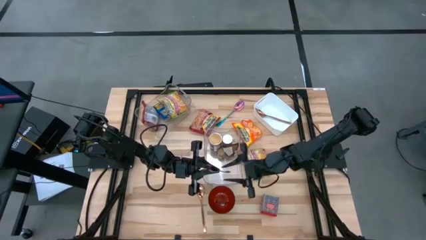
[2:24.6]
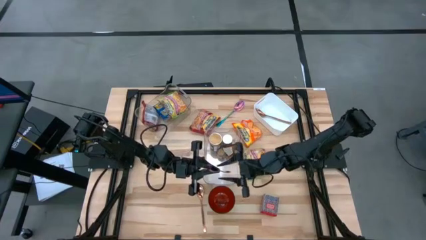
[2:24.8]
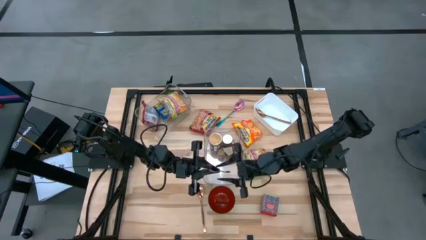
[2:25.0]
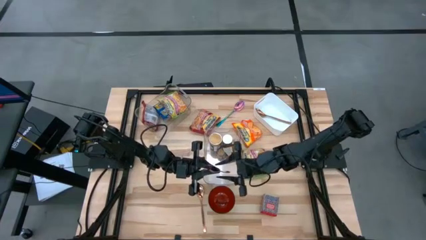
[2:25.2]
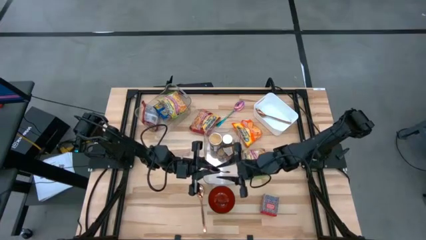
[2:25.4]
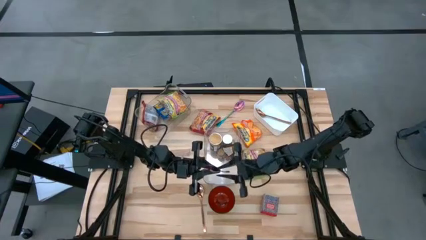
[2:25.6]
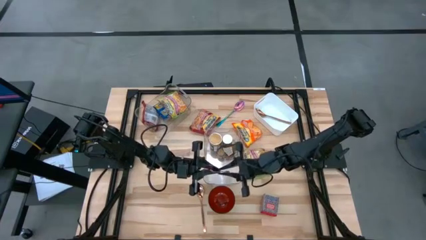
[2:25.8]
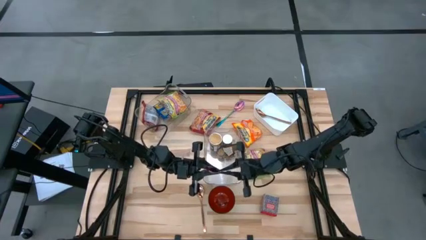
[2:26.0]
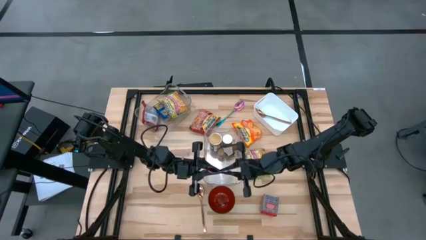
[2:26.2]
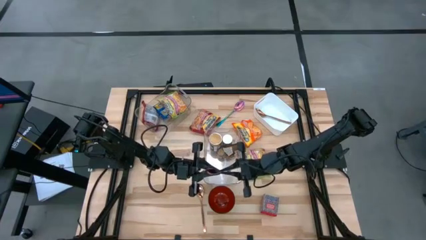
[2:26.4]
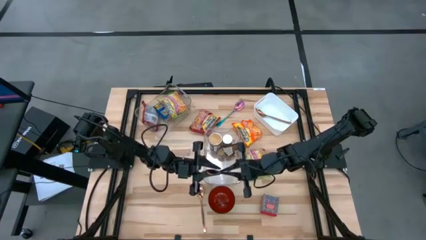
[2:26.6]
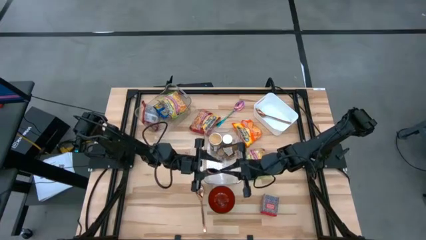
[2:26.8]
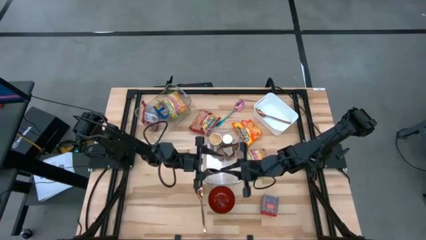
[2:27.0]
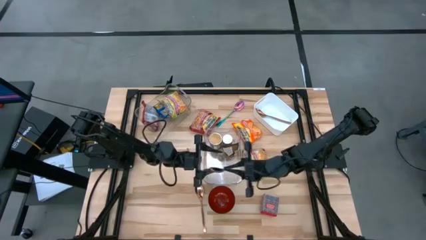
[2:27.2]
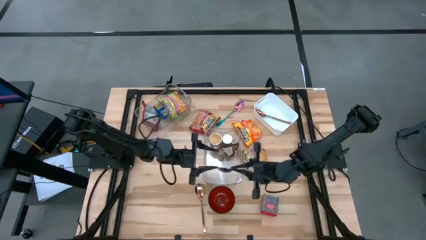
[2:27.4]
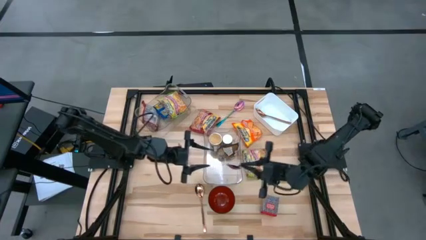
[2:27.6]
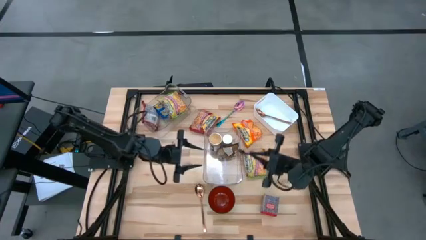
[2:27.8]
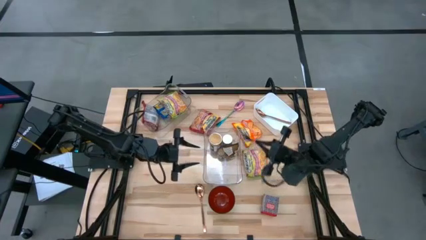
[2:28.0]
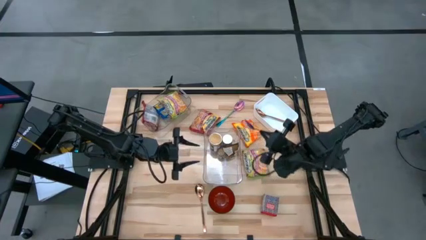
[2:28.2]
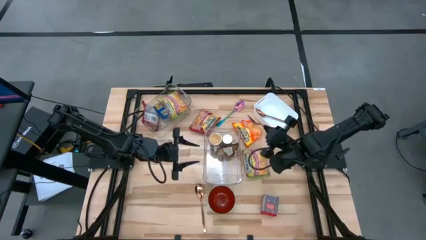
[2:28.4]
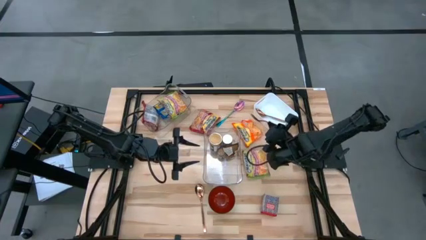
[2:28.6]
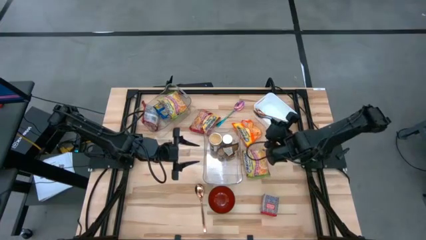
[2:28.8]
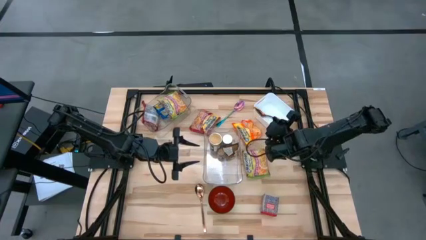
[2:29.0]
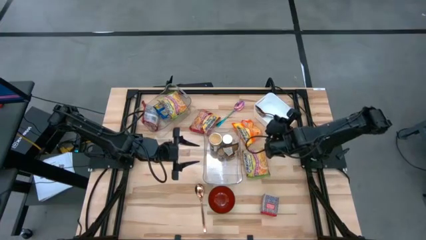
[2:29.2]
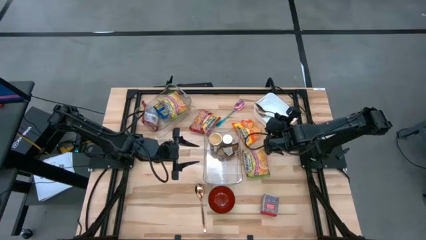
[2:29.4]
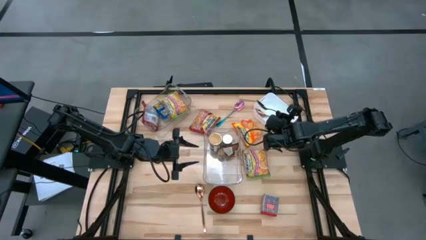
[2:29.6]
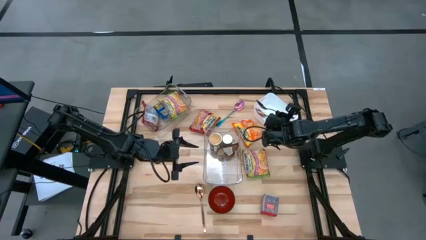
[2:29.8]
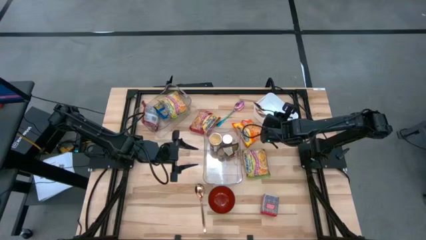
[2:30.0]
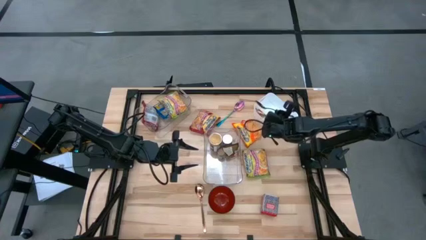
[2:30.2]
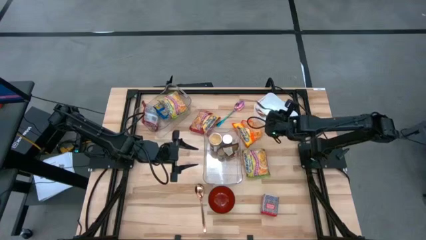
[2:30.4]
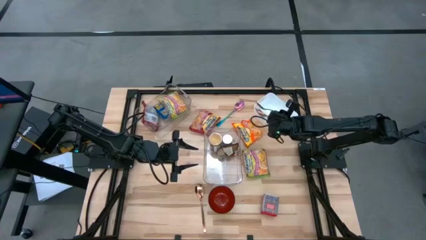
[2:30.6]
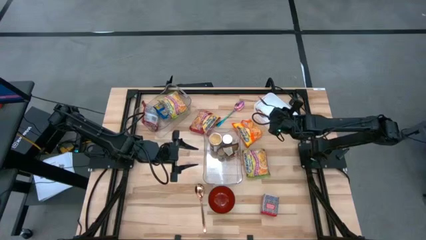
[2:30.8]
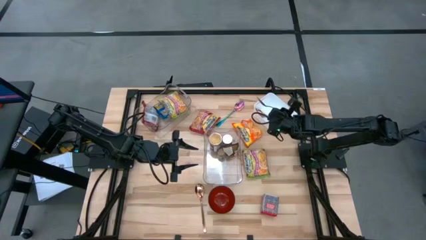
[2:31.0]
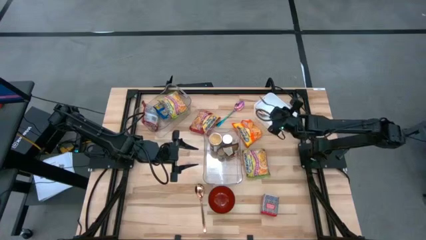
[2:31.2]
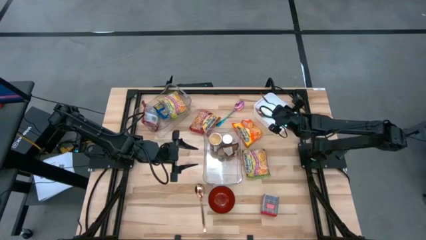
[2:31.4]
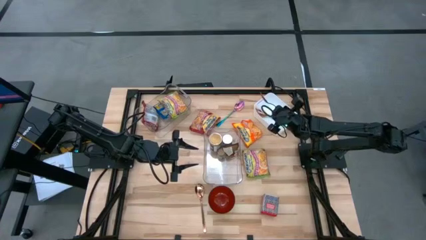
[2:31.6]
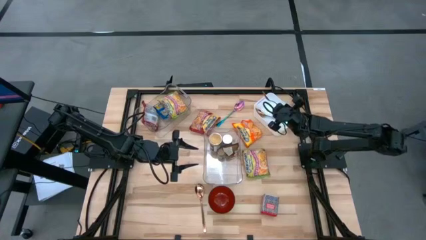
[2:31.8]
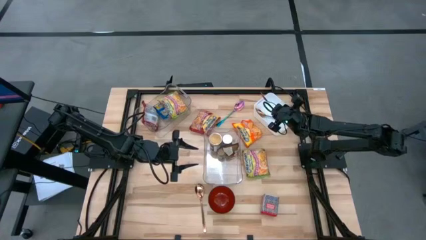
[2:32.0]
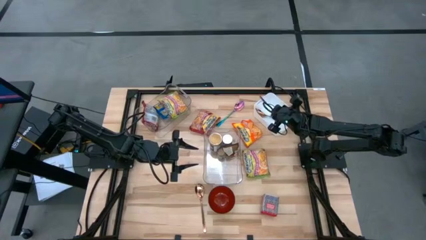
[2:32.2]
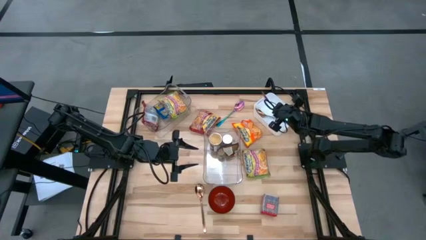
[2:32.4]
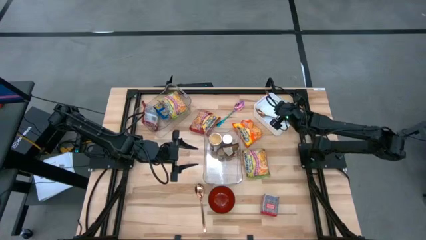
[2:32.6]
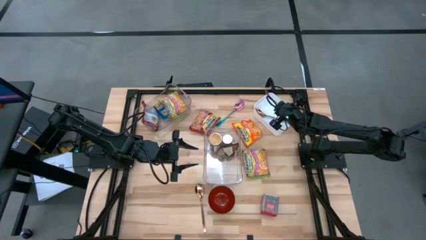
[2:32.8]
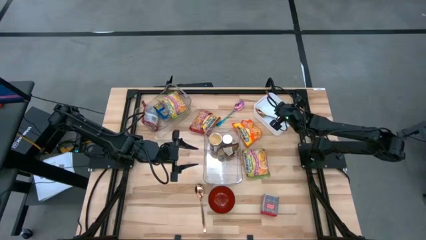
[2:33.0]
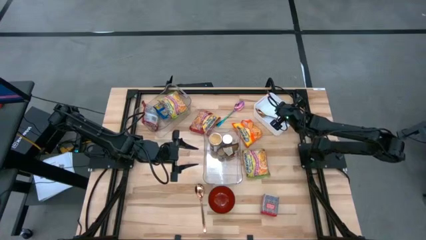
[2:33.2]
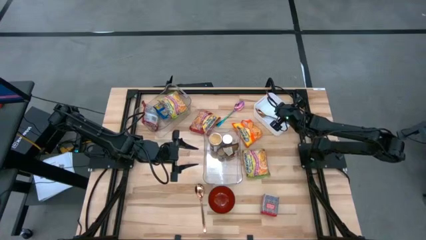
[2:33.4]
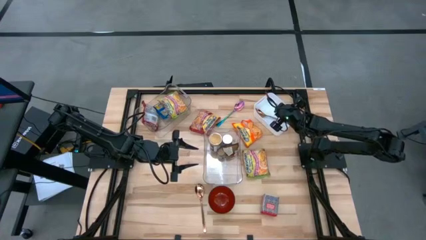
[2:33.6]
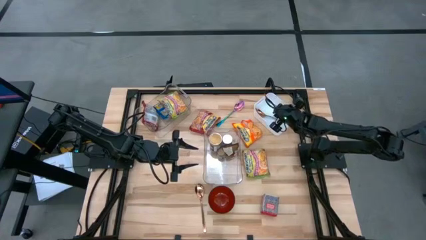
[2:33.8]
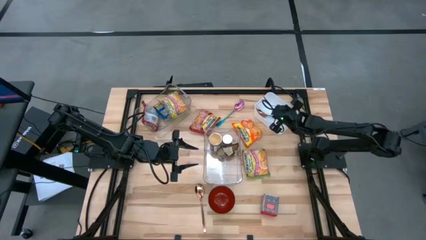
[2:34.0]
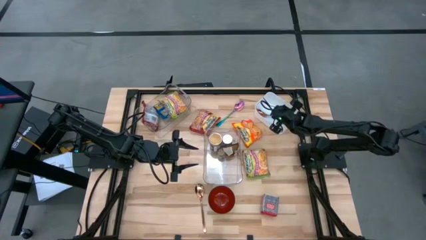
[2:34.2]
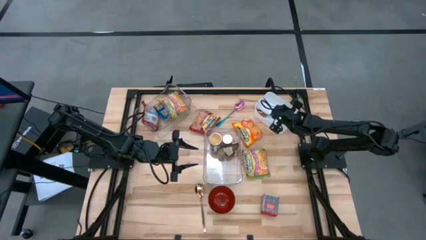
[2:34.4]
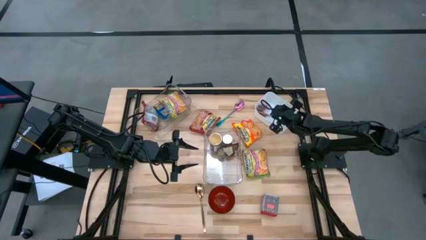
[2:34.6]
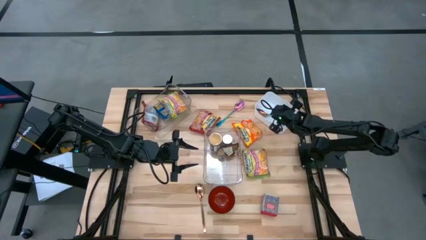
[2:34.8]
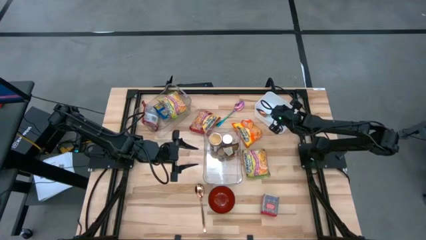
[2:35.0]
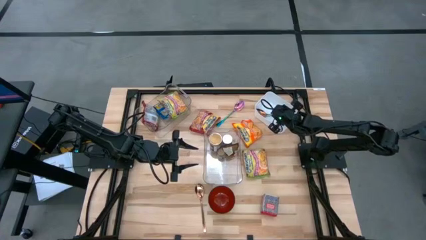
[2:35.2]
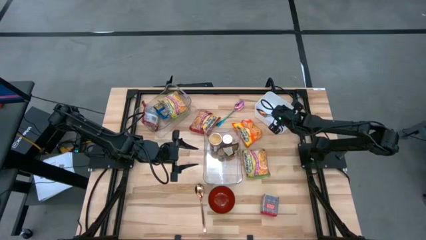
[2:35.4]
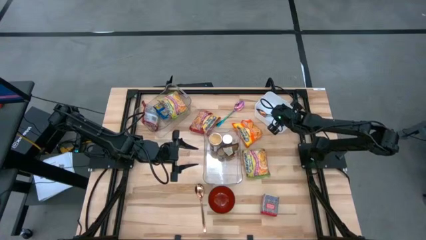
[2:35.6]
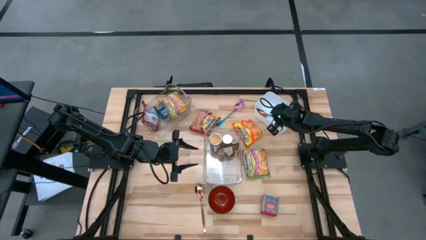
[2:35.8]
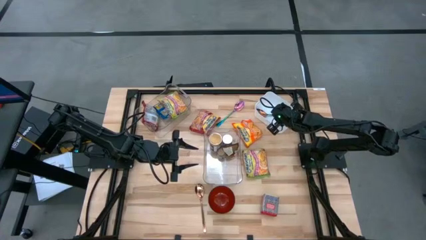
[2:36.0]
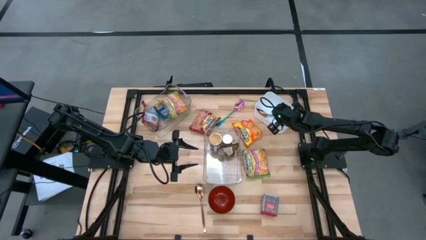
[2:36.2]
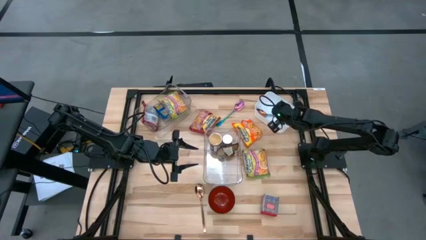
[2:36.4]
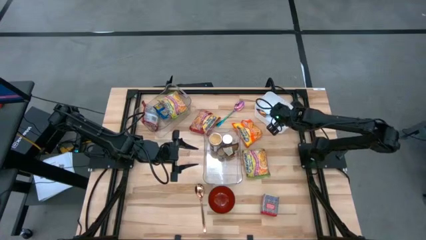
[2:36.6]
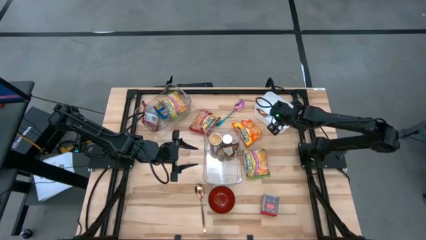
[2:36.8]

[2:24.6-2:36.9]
Task: Pick & Place Food Item
Put the bottom blue spoon into the white bin
